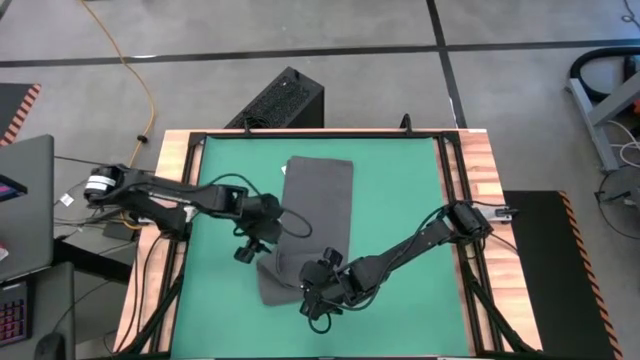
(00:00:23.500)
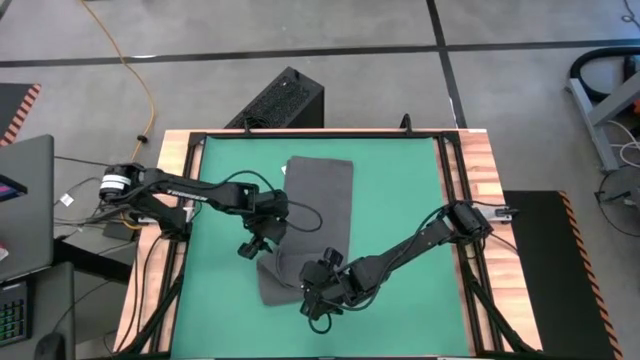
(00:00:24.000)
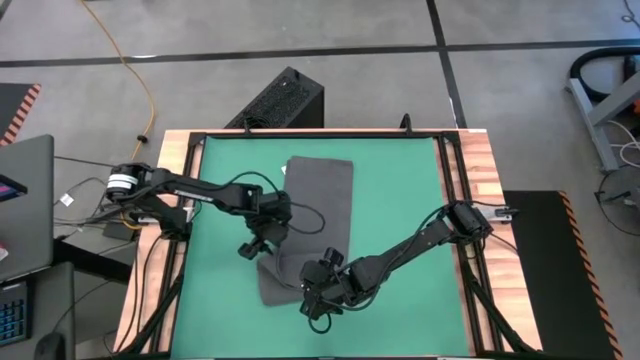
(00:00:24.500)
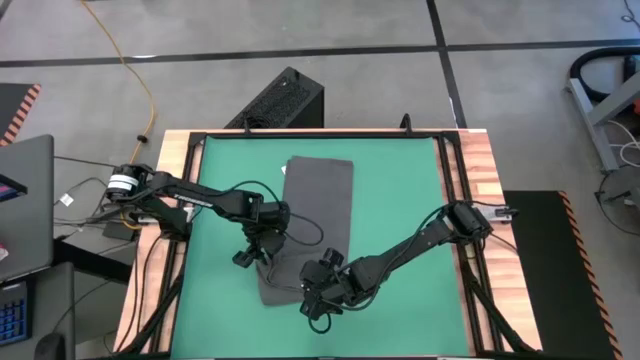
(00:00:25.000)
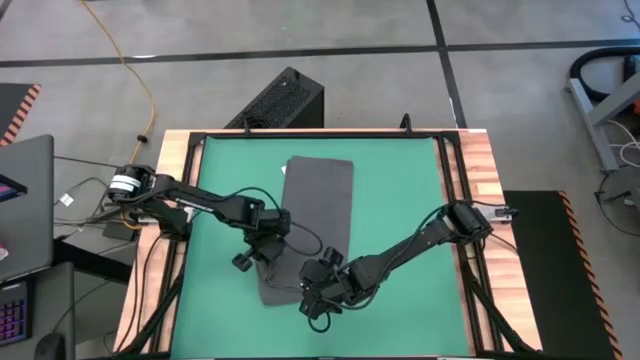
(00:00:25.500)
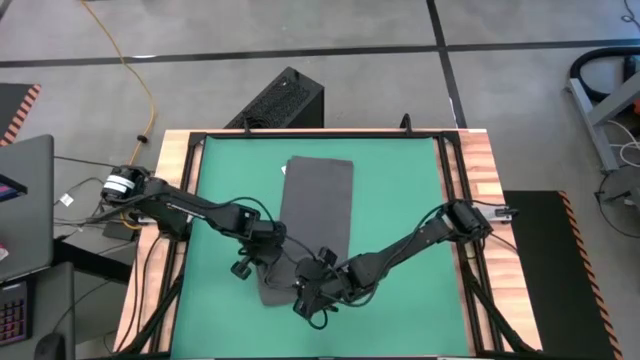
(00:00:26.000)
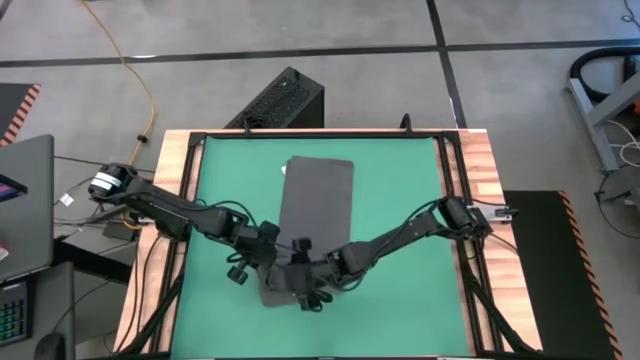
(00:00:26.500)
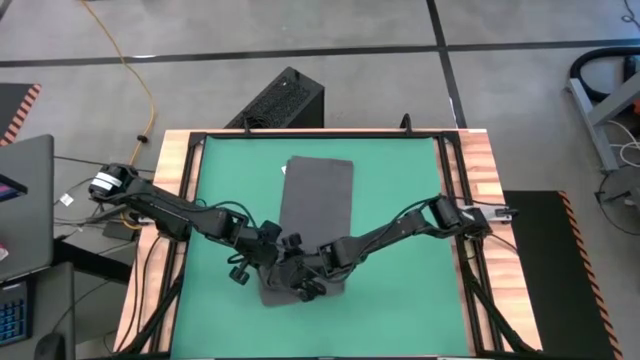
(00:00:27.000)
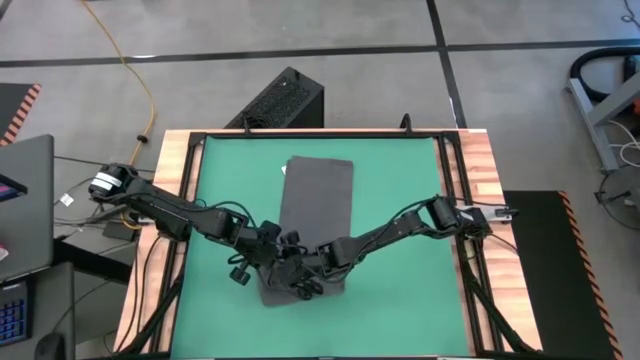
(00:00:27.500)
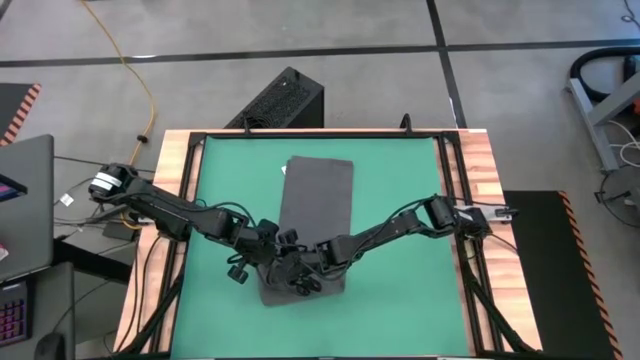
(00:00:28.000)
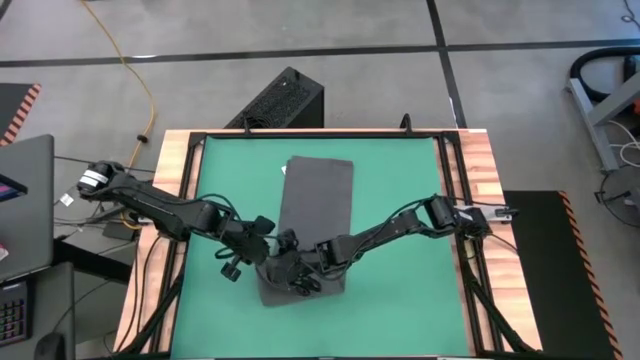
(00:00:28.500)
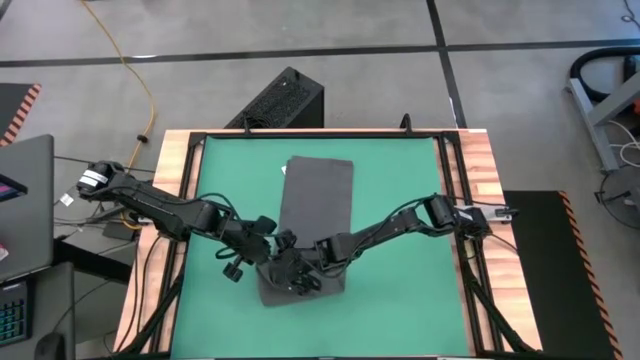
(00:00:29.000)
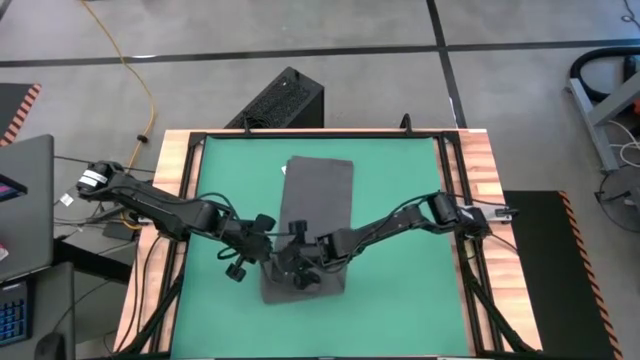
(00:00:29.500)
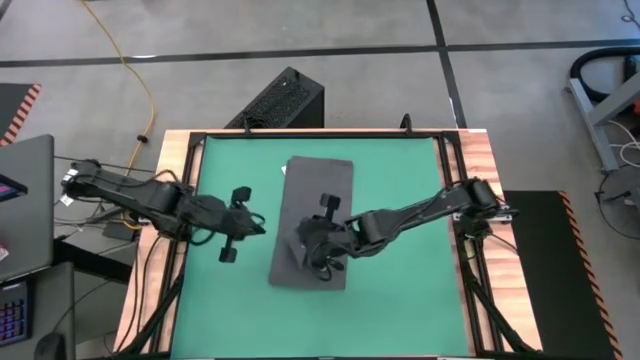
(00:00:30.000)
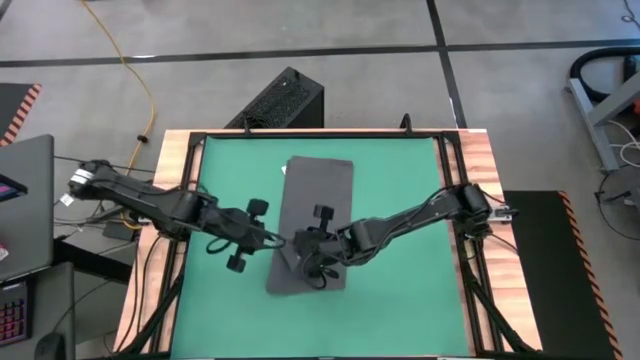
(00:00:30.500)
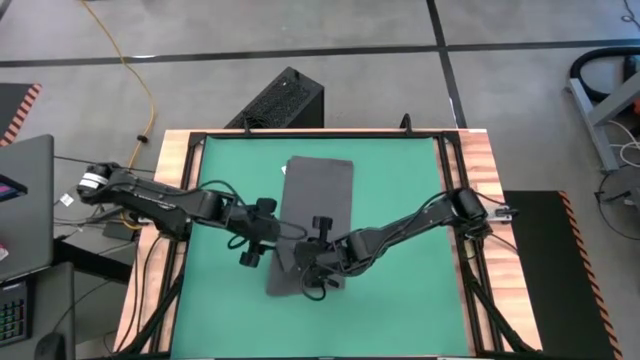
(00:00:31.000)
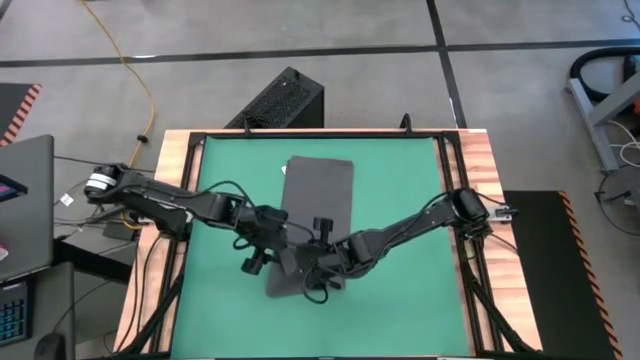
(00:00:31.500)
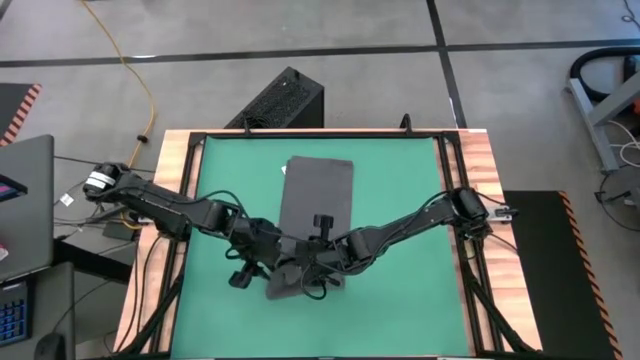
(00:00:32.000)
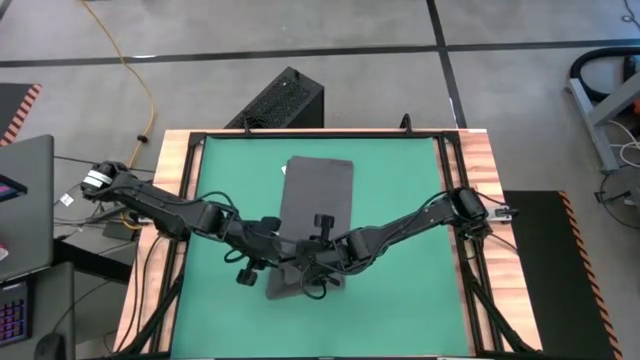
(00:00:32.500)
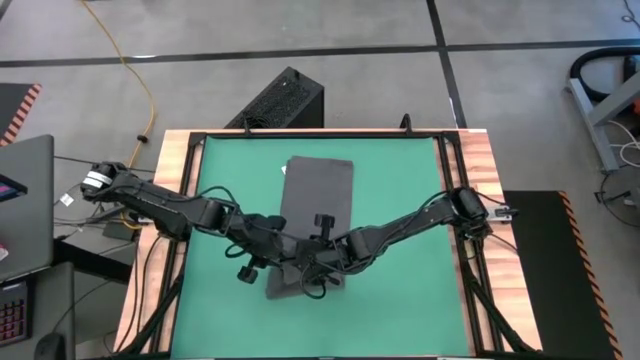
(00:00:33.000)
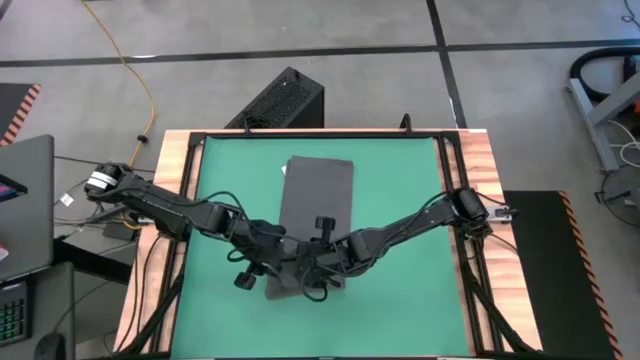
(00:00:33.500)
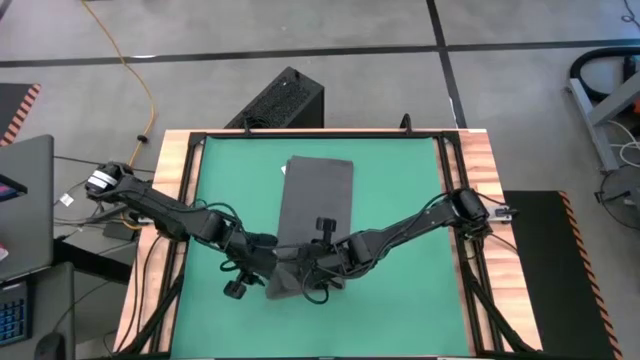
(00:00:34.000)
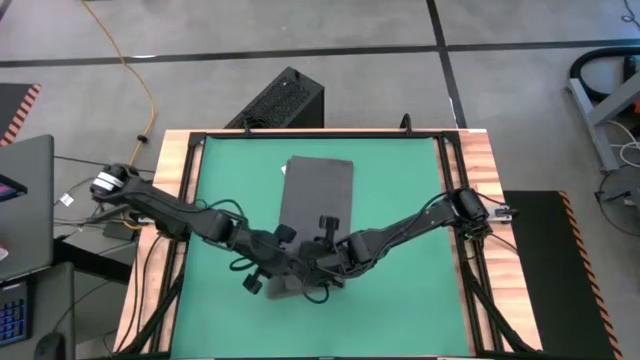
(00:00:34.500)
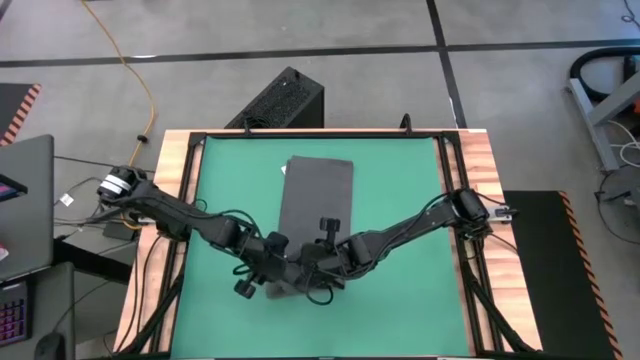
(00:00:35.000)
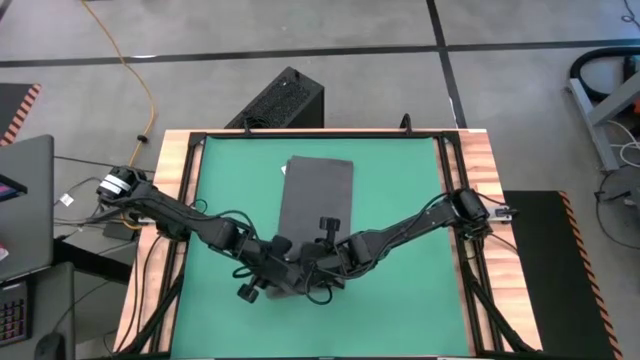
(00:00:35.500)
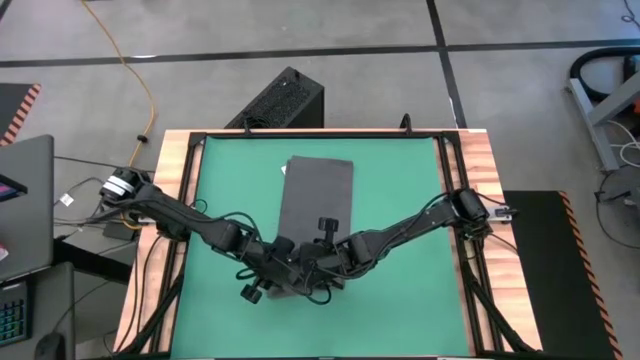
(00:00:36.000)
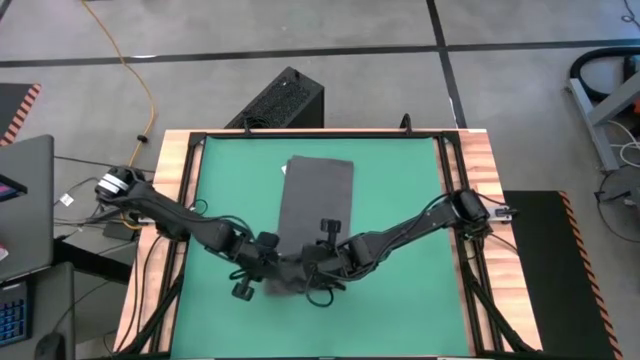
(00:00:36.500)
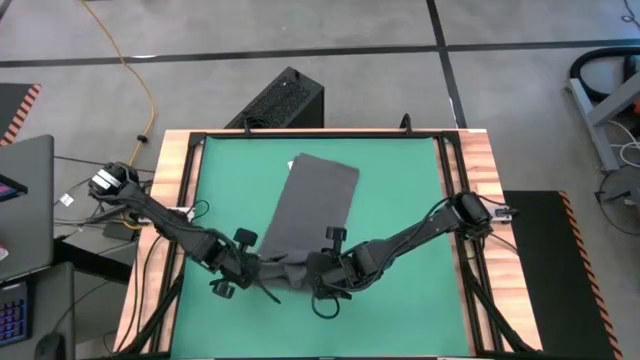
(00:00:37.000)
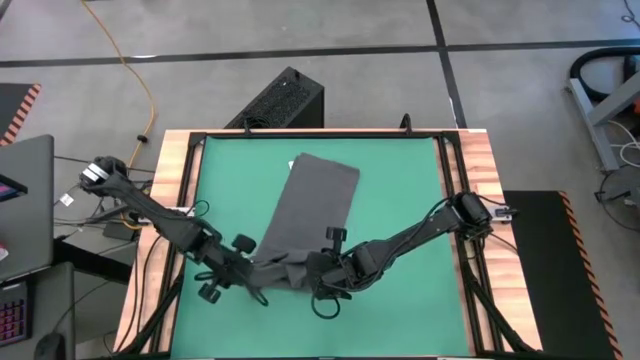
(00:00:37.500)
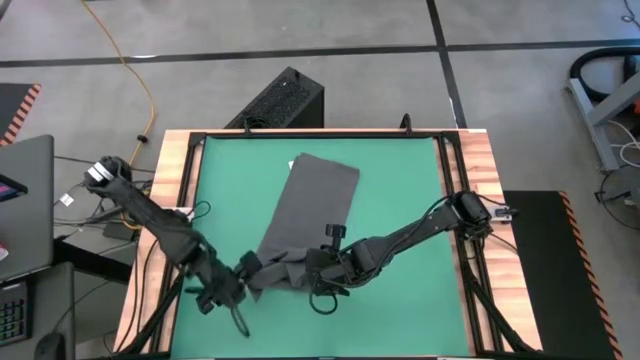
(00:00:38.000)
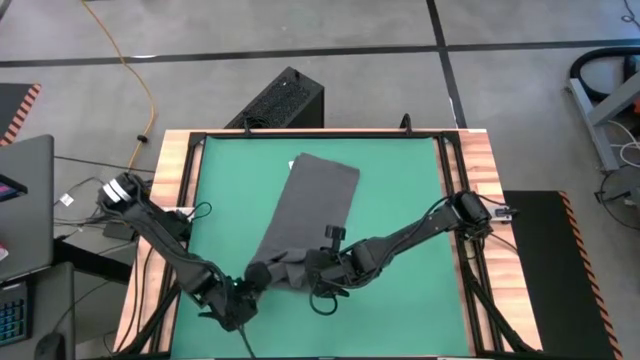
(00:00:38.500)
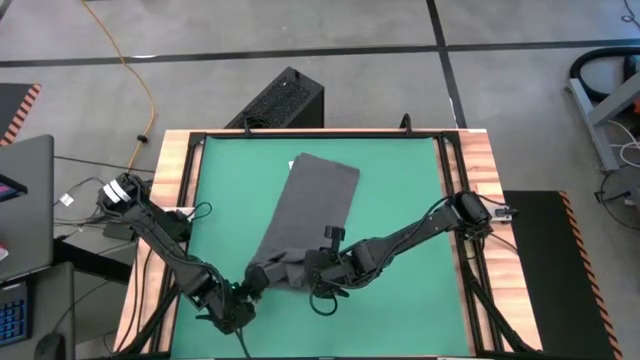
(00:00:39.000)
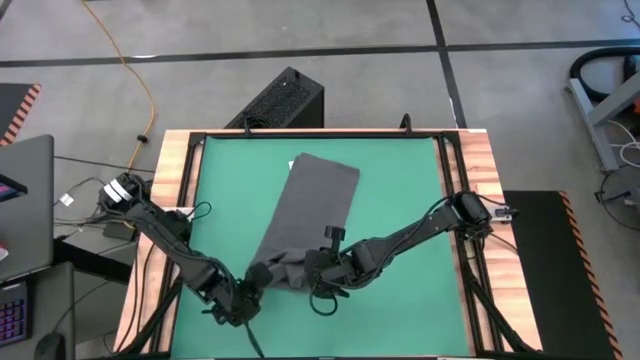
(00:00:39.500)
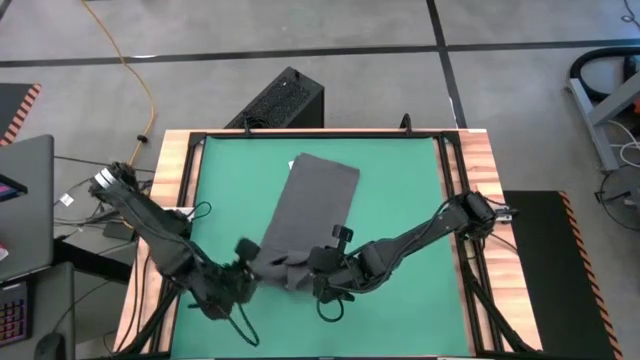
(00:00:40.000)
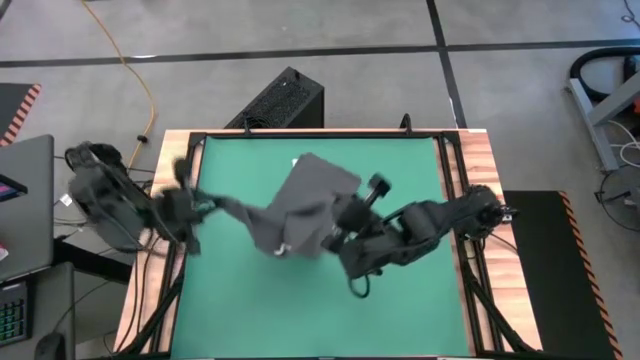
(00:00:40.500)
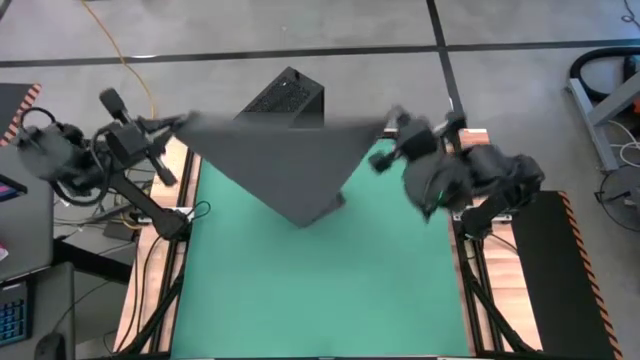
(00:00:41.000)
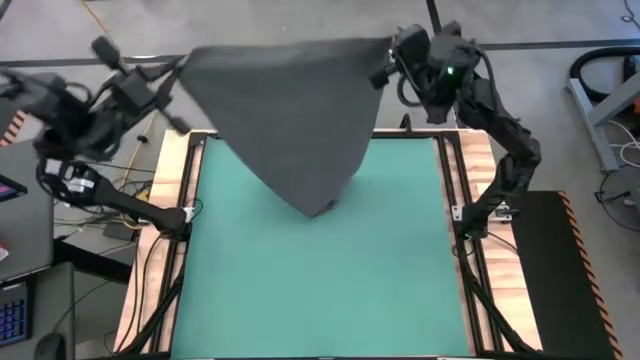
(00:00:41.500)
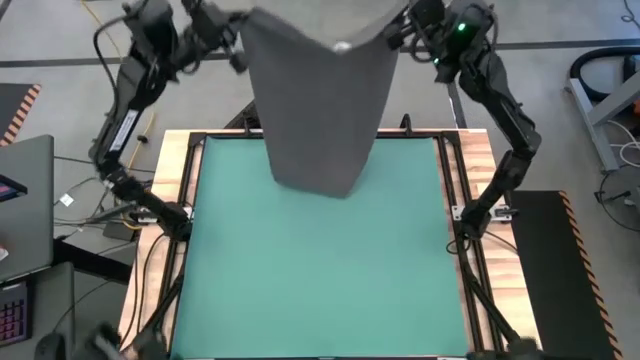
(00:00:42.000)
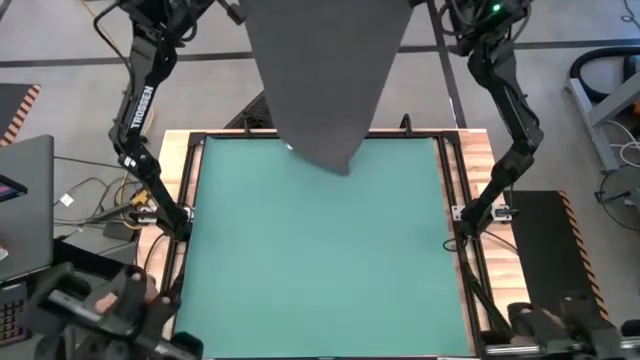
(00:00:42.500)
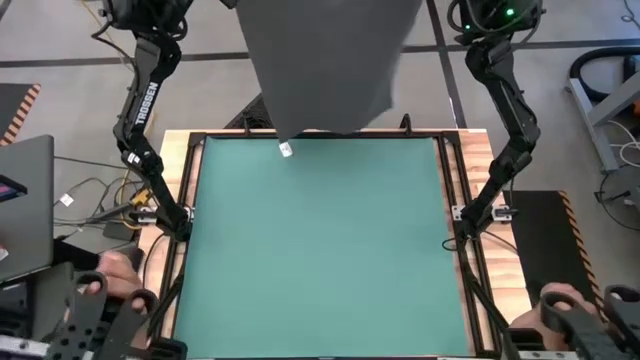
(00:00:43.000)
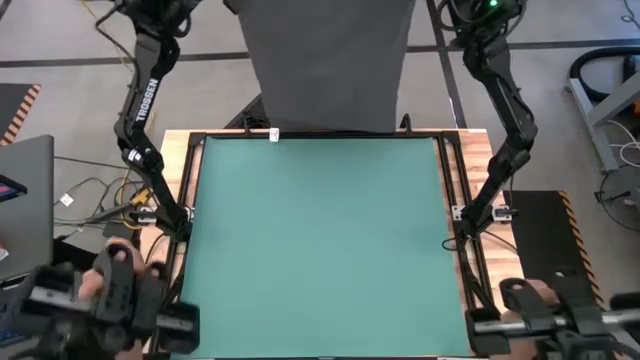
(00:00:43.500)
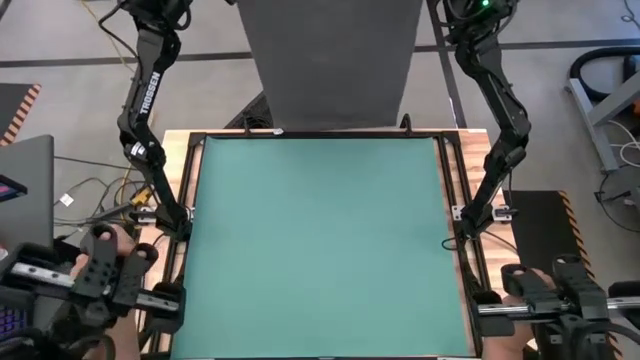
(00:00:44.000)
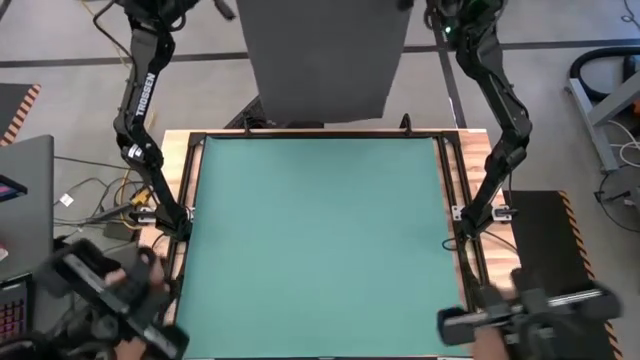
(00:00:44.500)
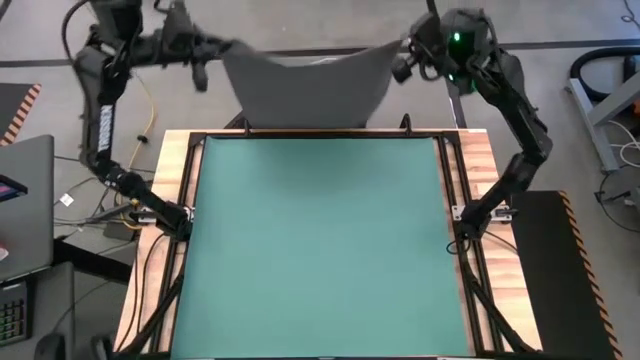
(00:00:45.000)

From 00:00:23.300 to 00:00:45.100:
Task: Roll towel
Fold the microfiber towel
